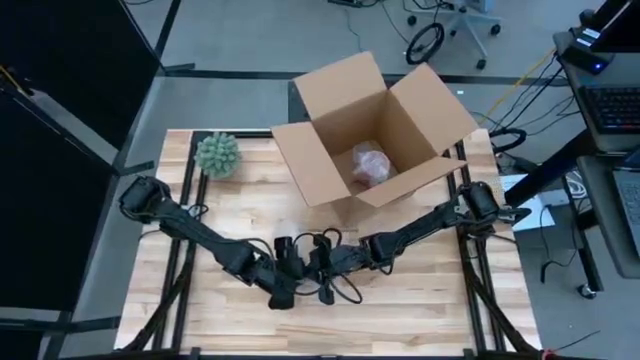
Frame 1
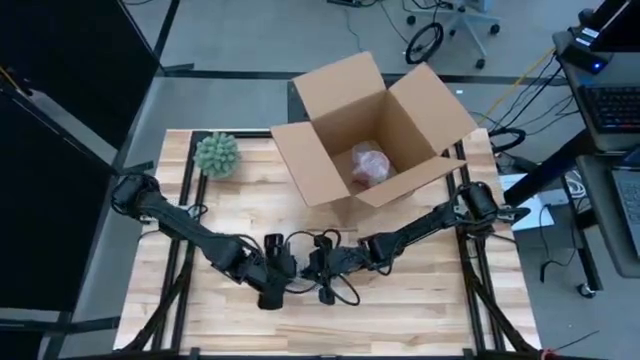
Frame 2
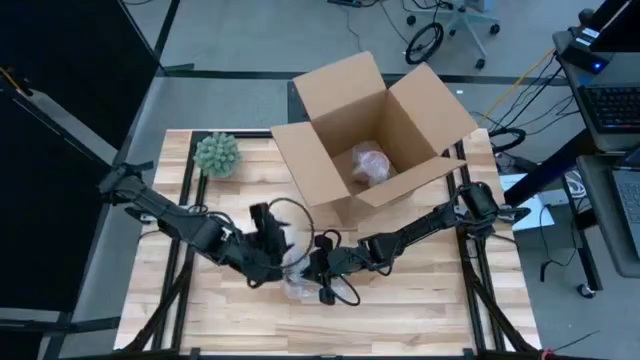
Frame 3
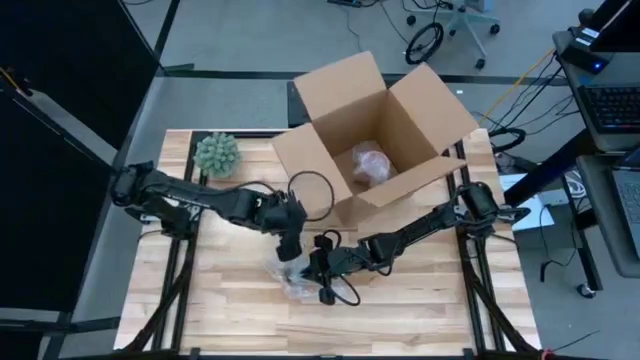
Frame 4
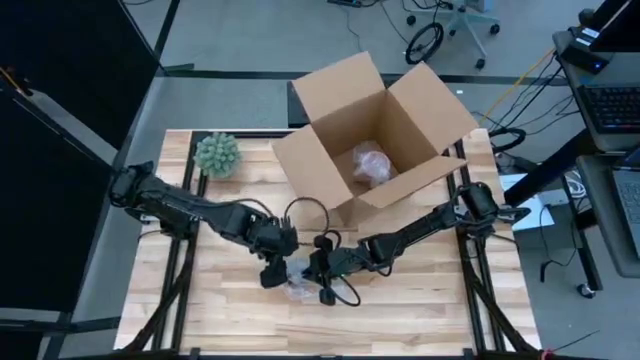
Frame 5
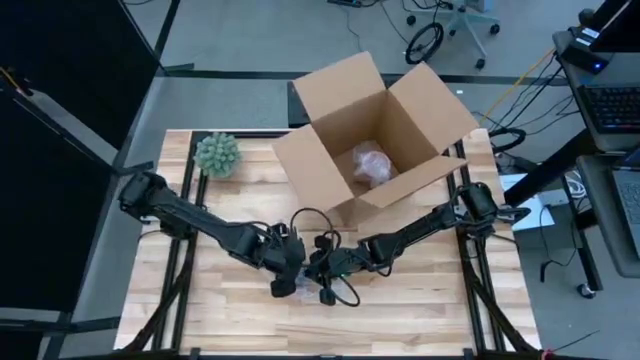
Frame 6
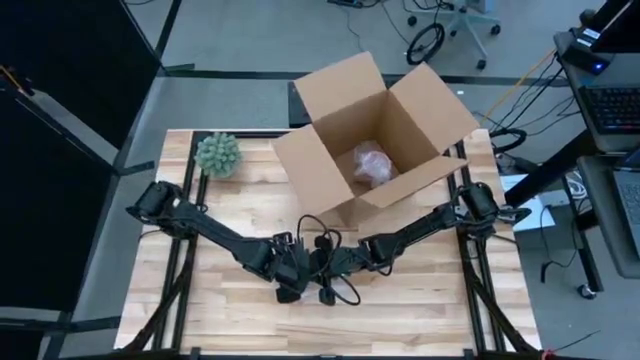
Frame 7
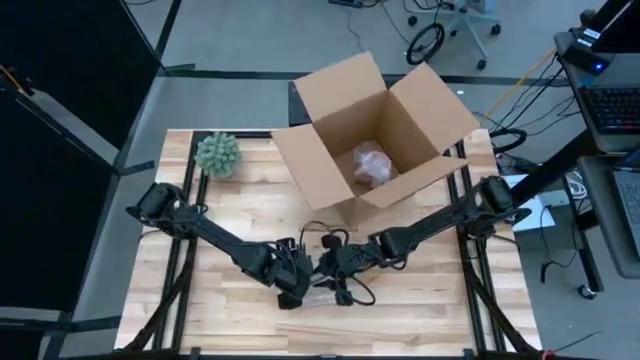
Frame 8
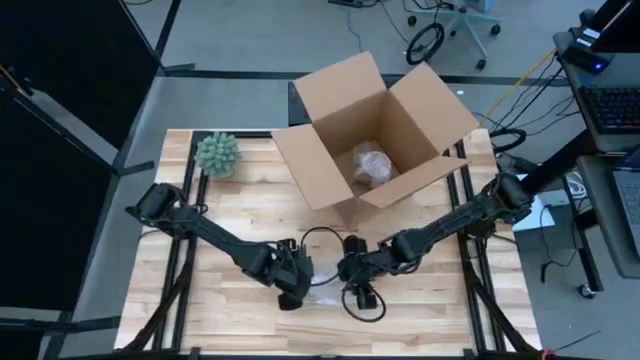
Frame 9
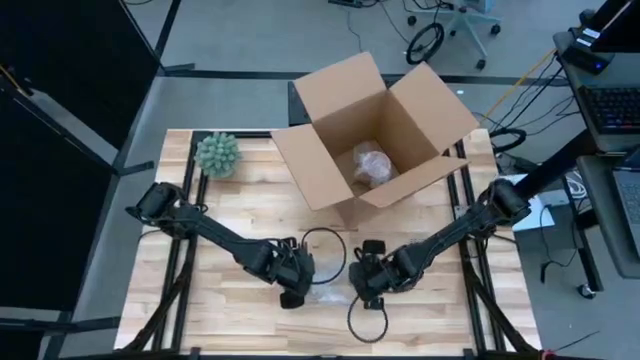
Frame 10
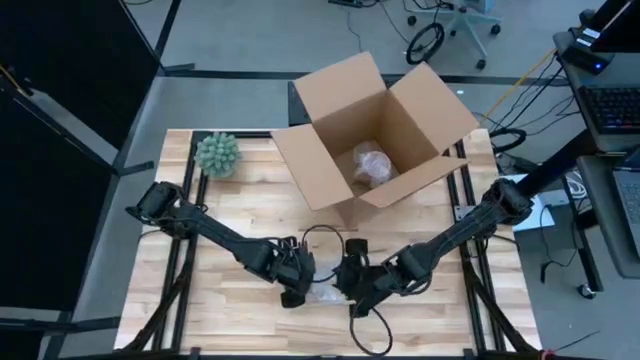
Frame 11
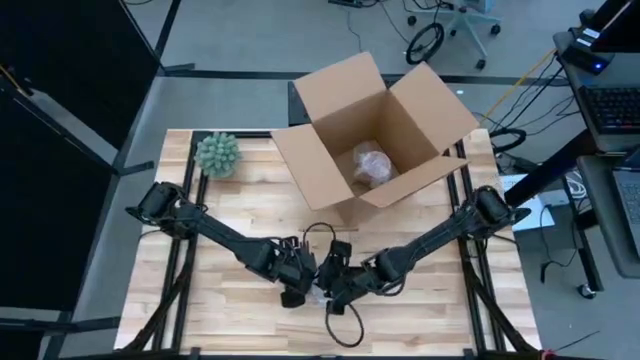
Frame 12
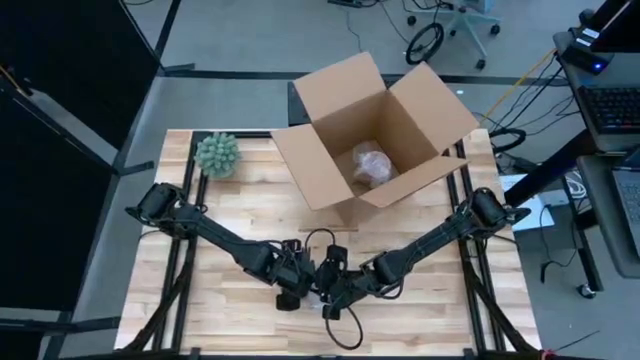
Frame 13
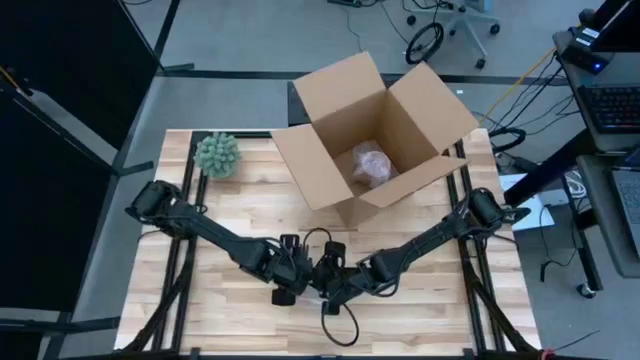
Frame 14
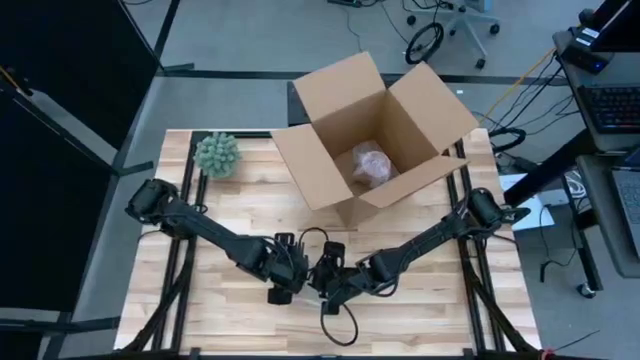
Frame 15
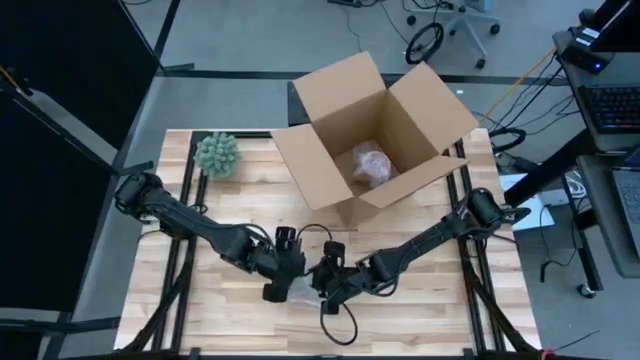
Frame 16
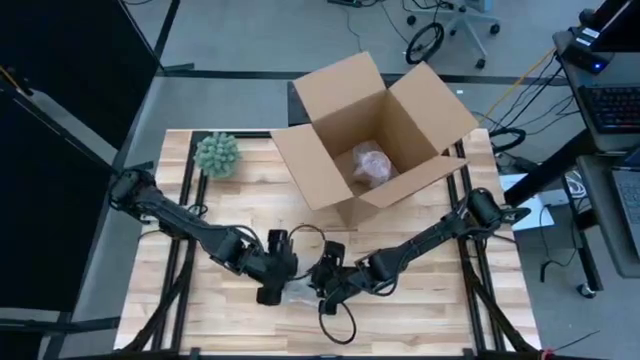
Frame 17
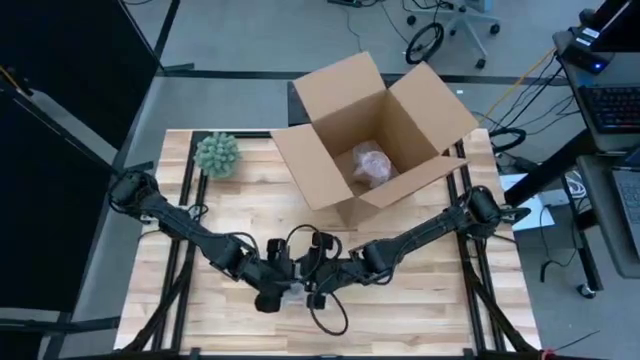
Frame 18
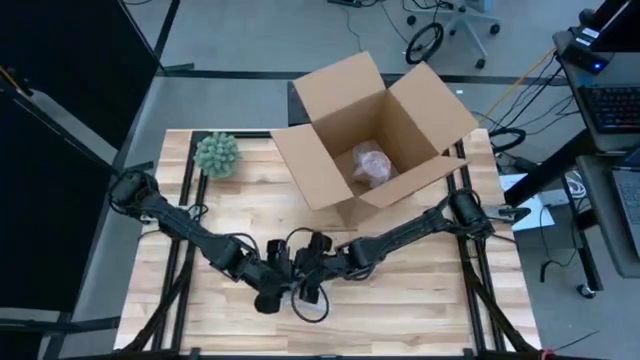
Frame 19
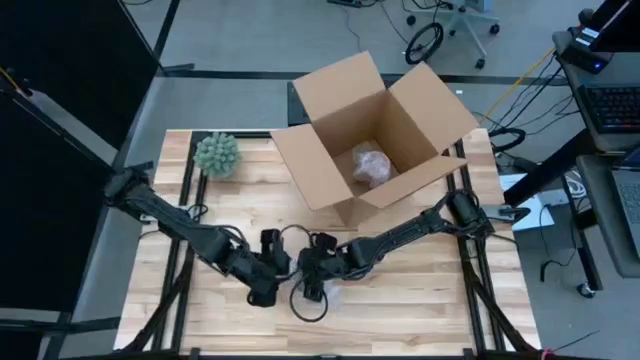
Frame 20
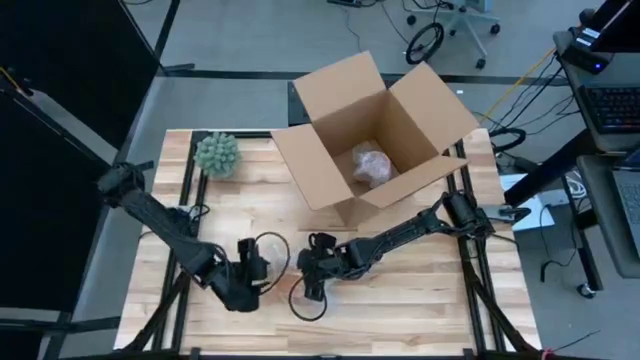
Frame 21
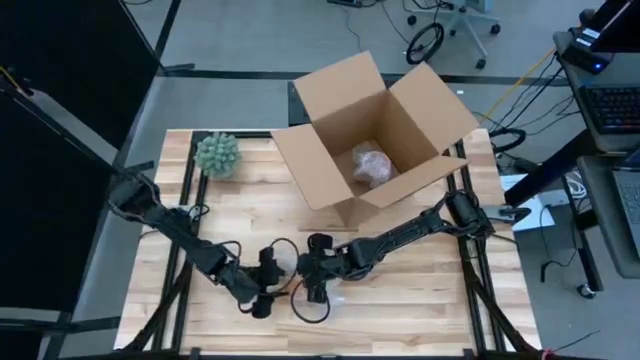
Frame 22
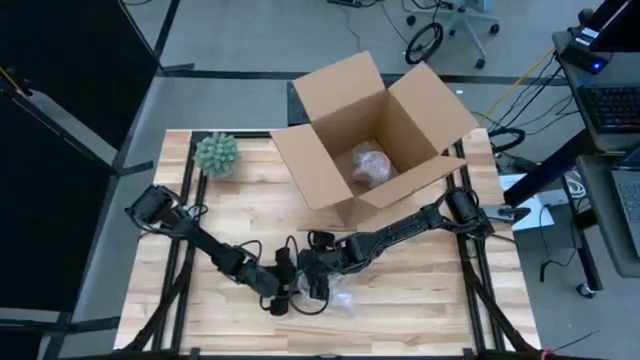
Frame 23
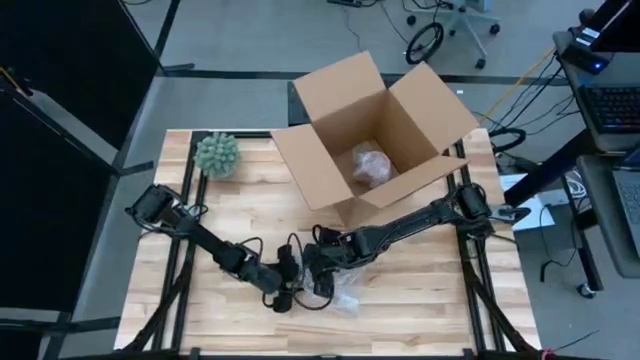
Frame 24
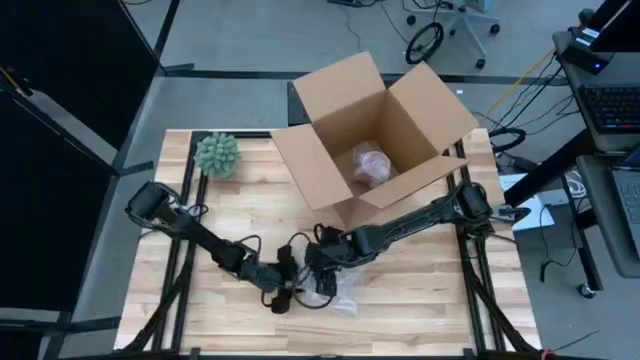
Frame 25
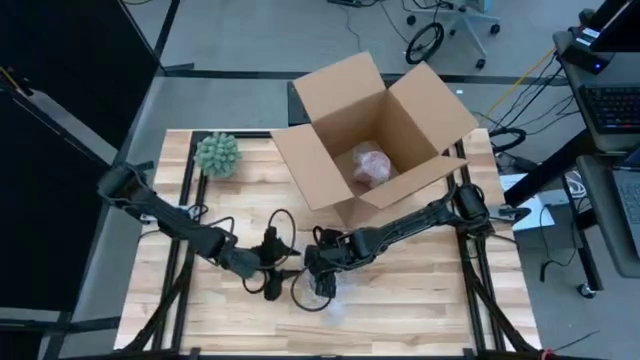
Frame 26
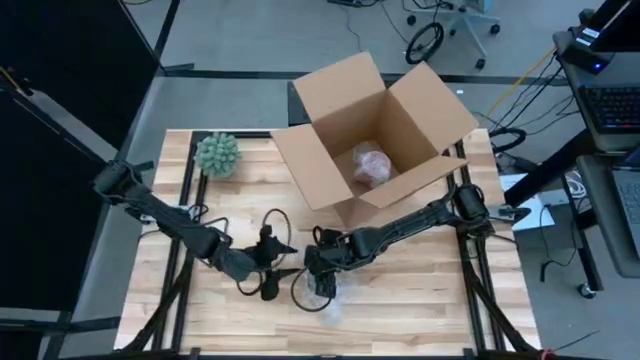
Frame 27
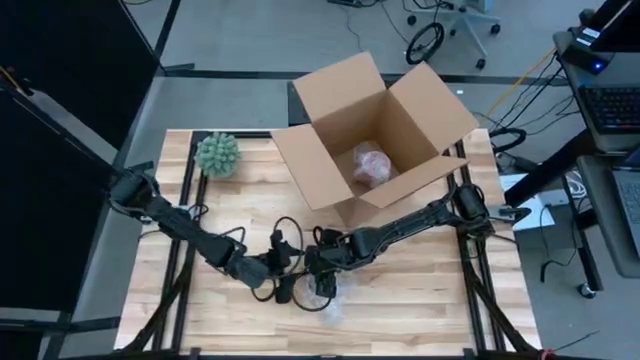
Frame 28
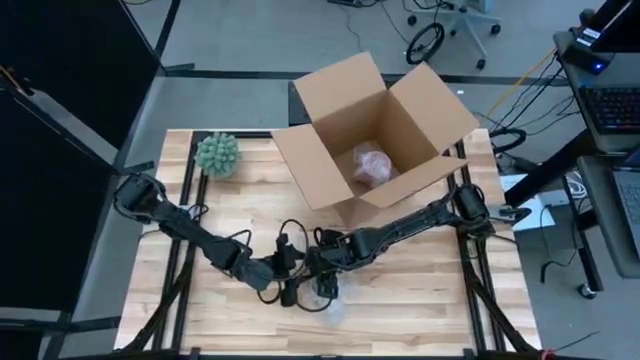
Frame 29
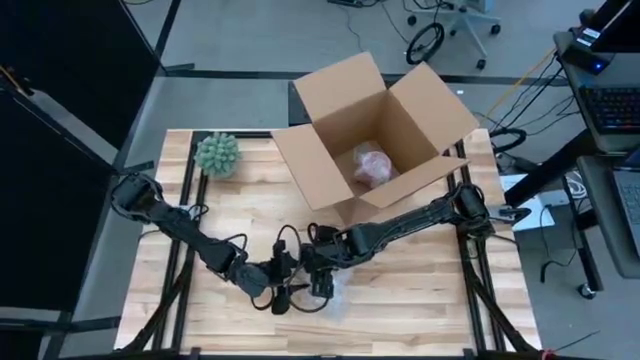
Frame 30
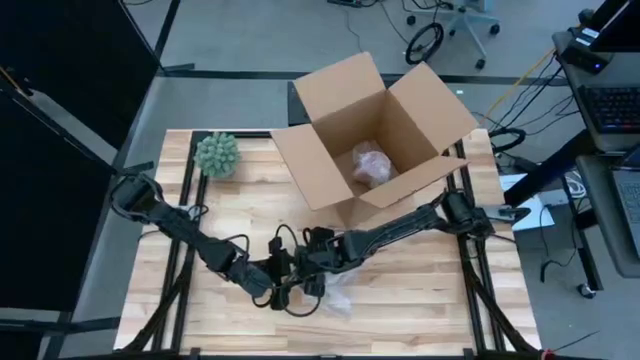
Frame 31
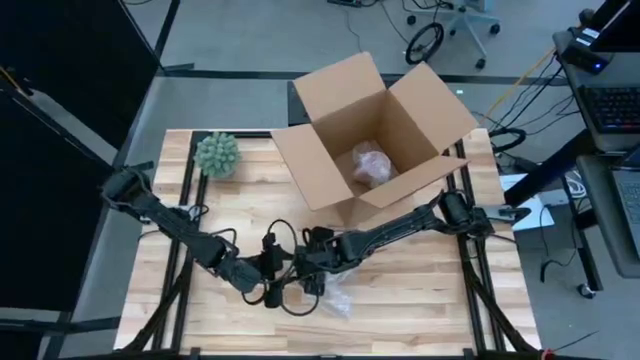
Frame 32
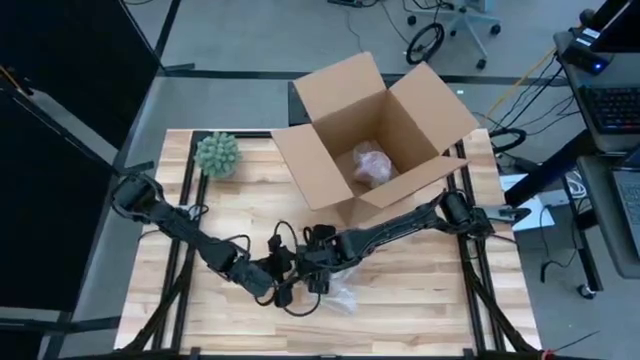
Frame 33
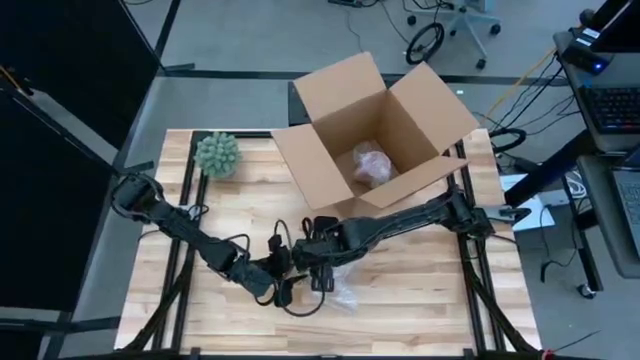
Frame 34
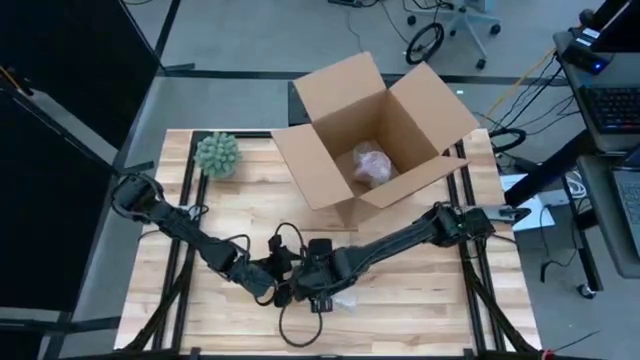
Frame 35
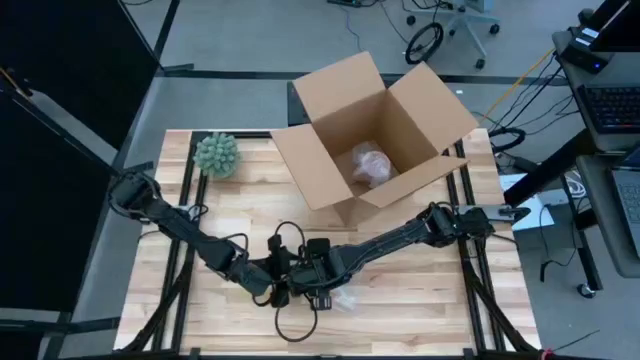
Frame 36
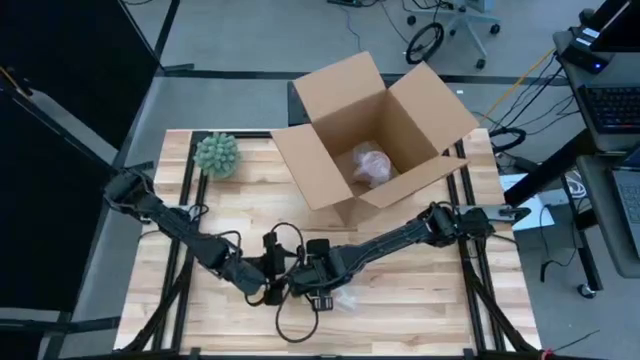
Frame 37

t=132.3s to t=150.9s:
Task: wrap mug
Wrap the orange mug with bubble wrap

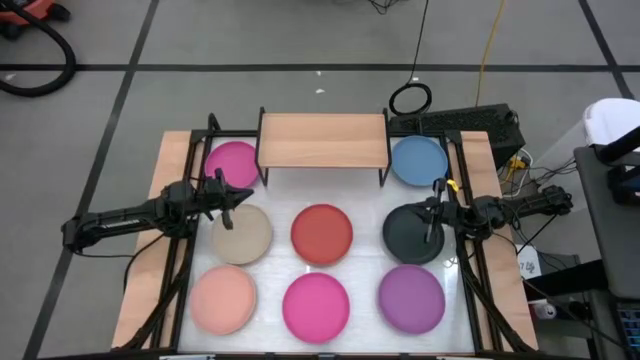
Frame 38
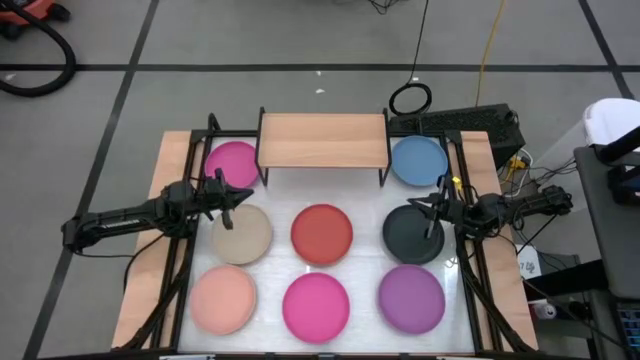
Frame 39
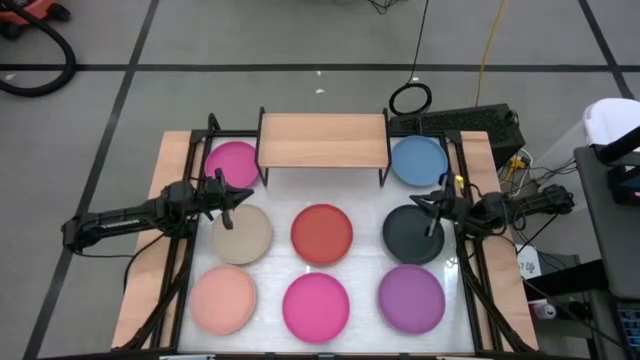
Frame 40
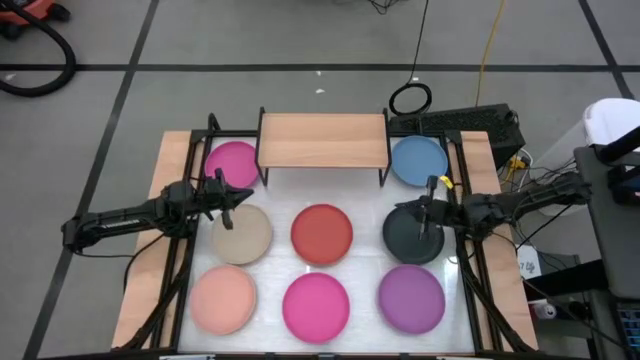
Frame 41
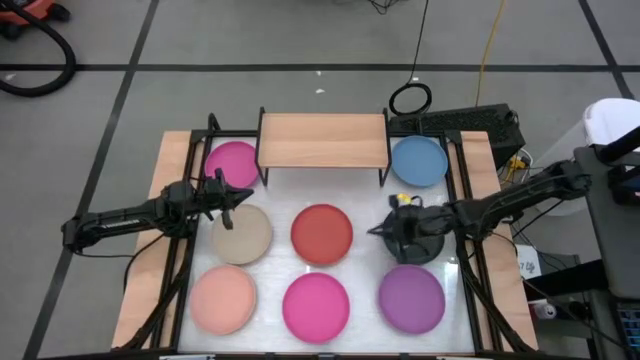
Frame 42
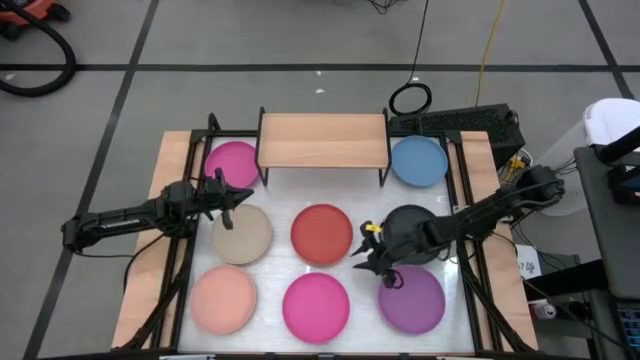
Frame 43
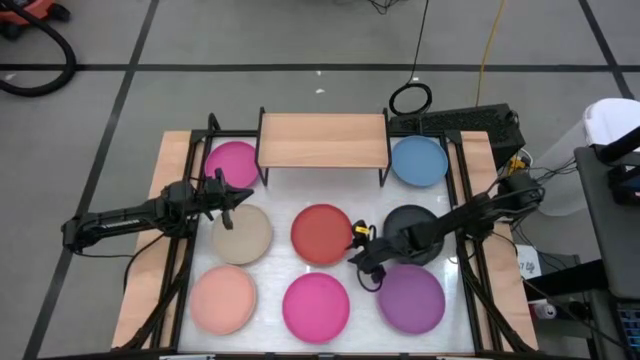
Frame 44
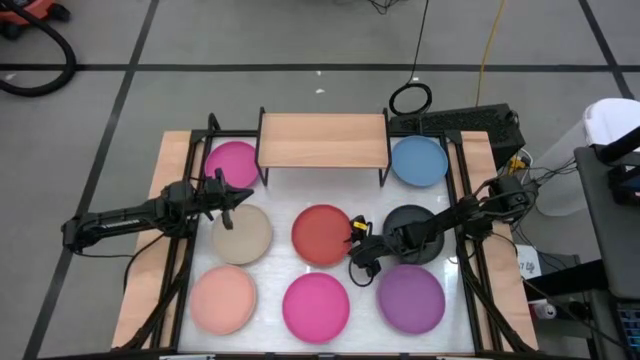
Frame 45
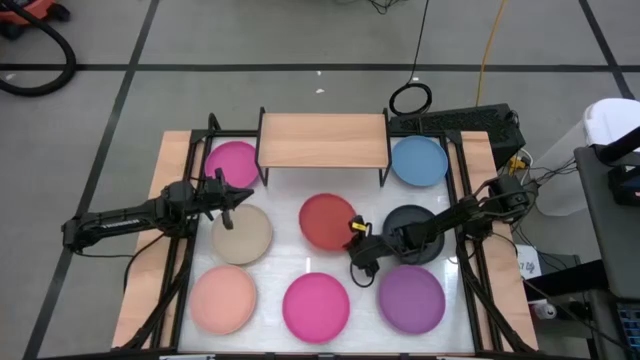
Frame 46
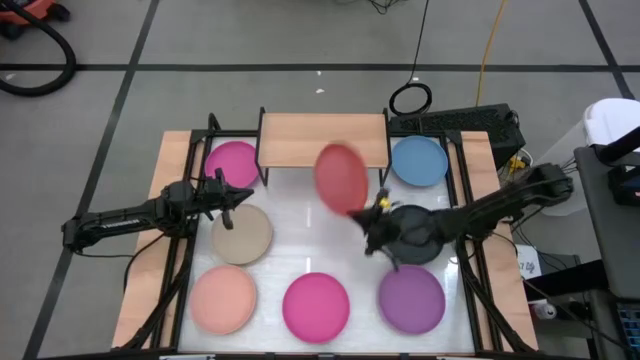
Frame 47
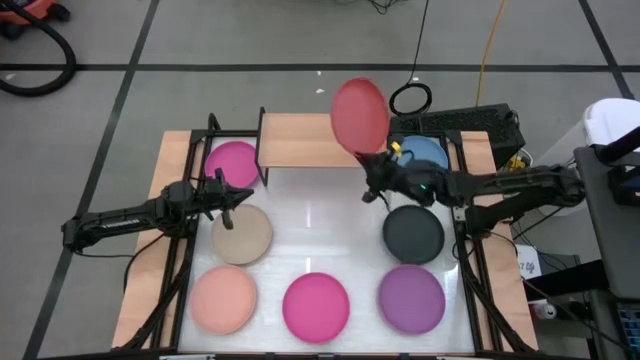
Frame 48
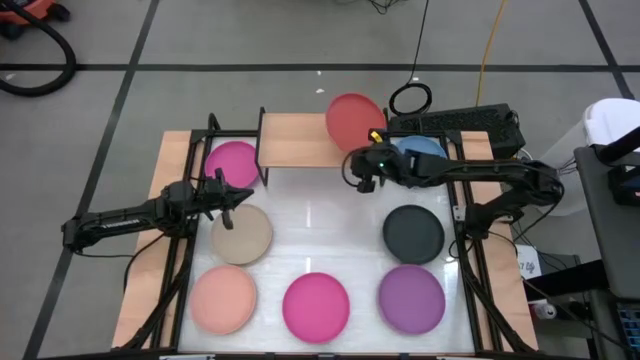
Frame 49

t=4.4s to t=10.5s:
Task: Place and stack plates onto a shelf
Put the orange plate on the shelf
